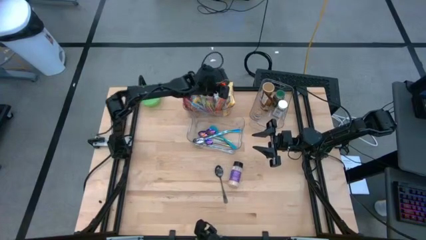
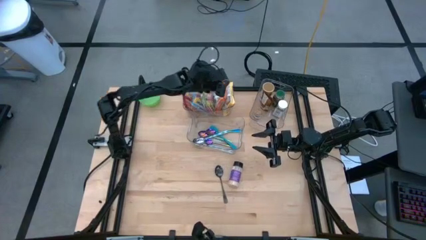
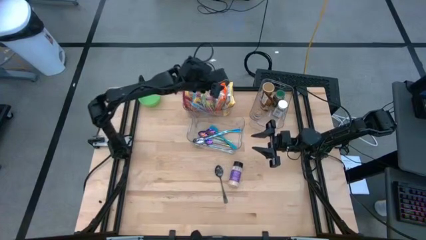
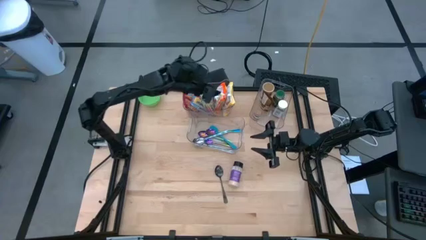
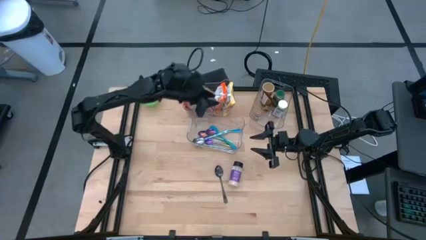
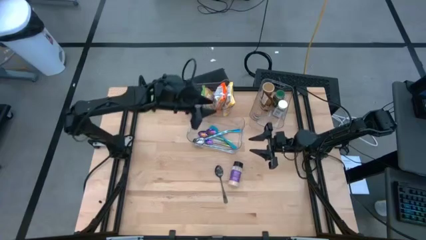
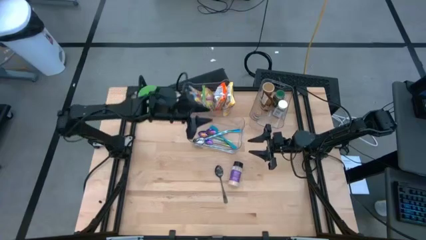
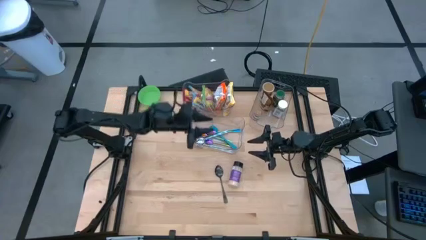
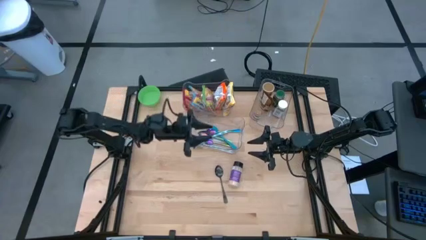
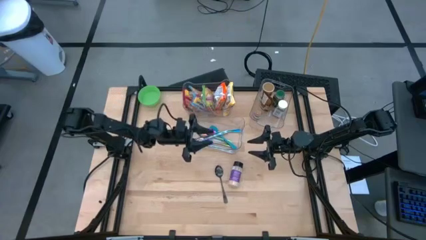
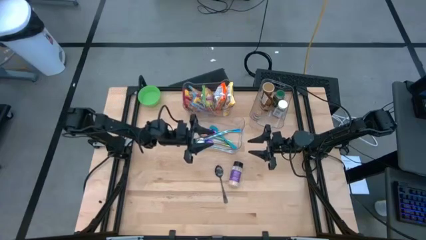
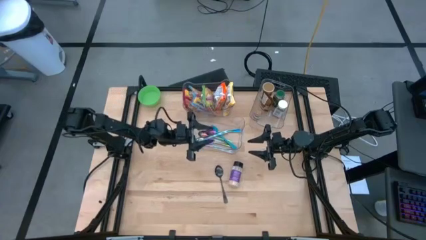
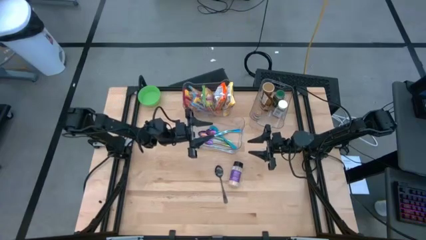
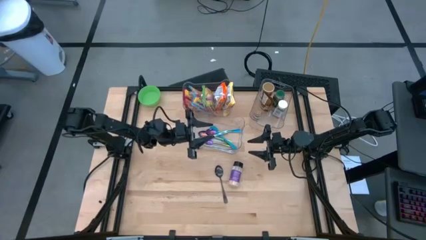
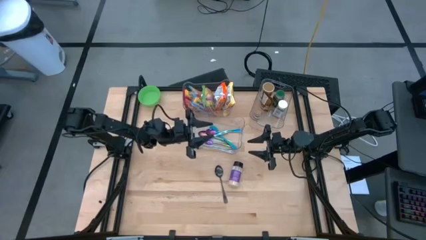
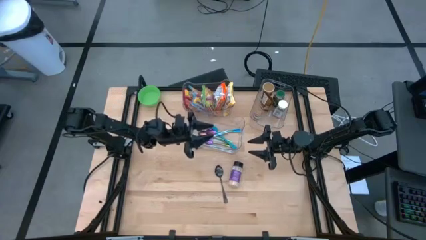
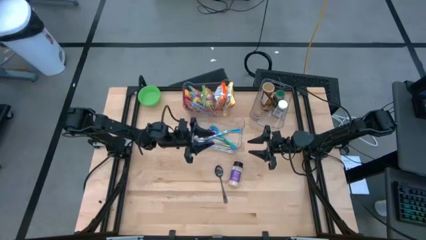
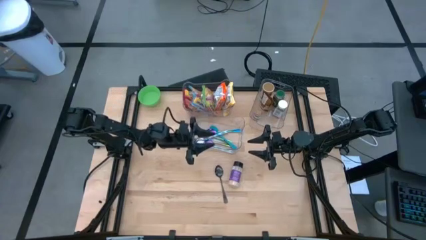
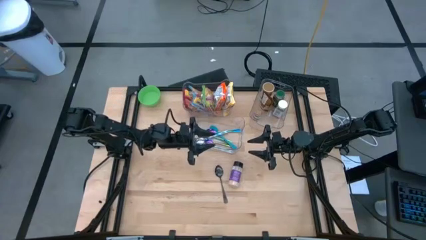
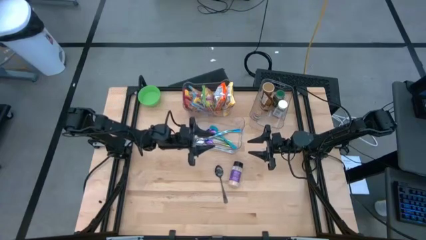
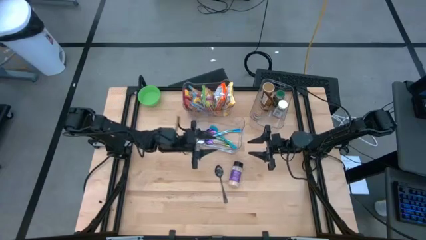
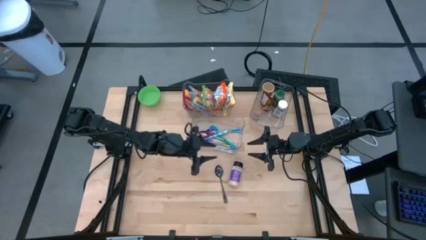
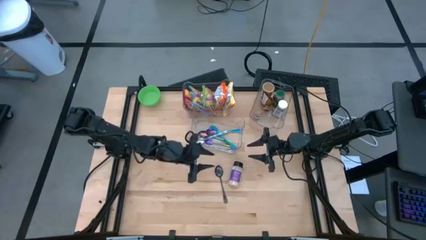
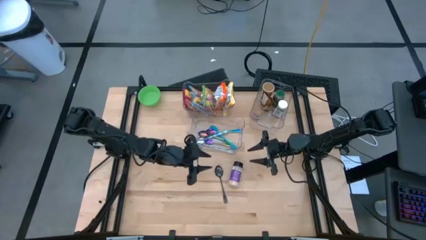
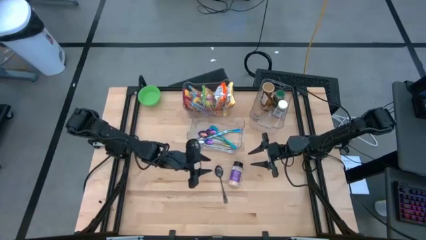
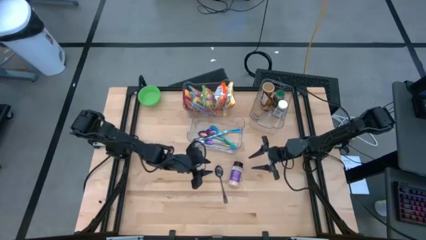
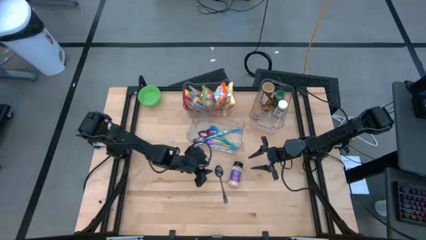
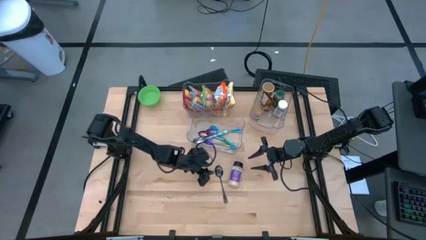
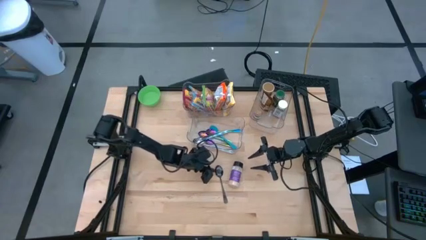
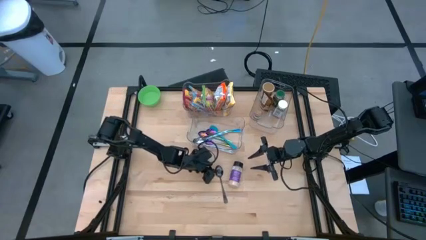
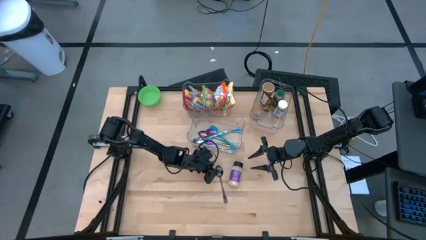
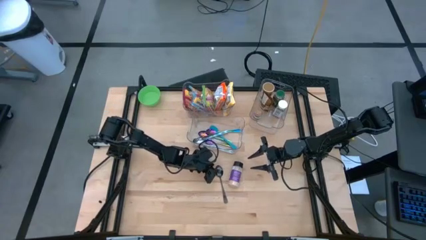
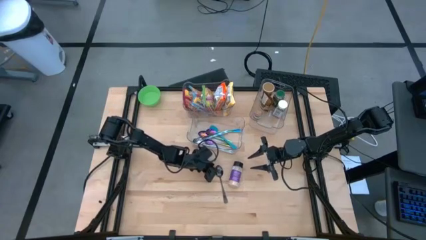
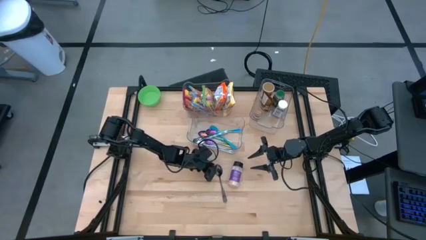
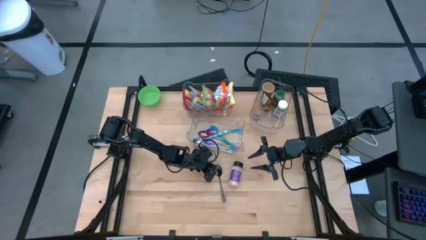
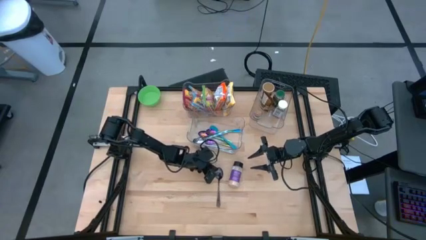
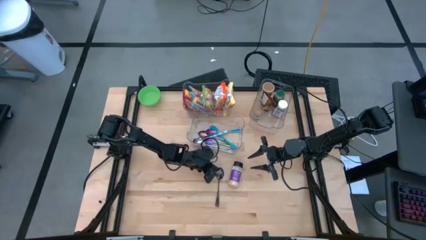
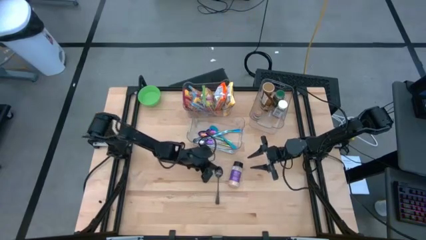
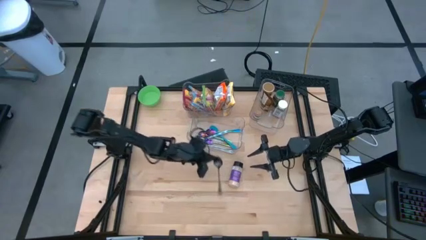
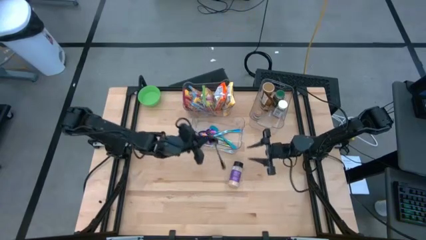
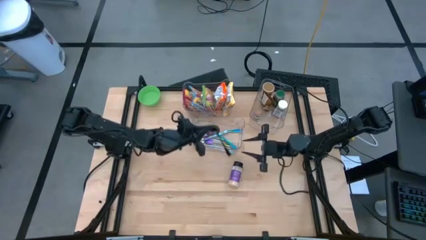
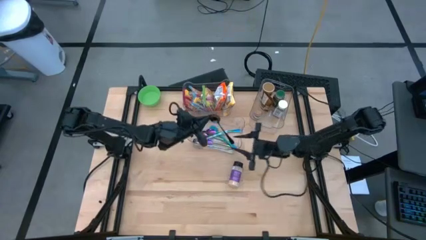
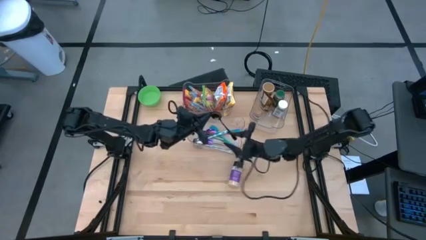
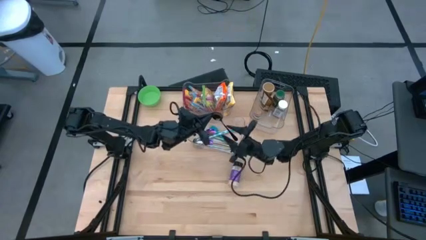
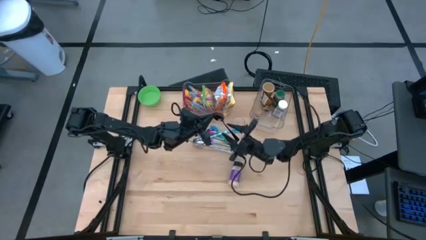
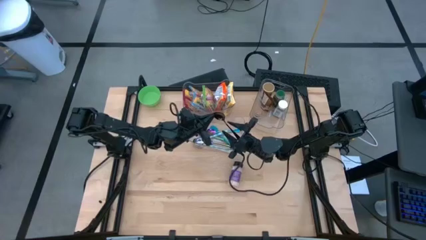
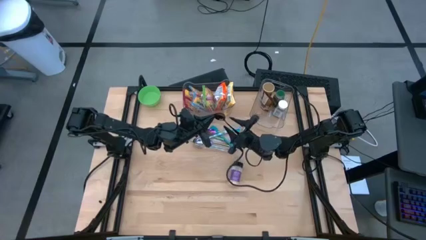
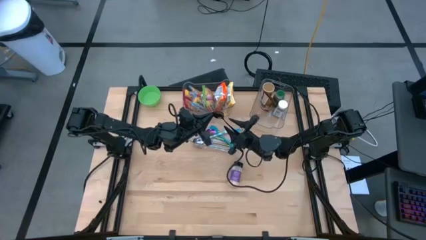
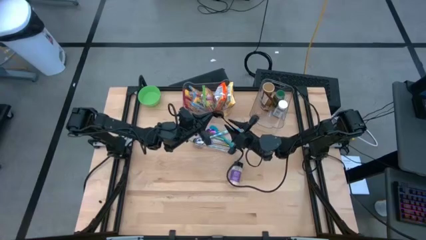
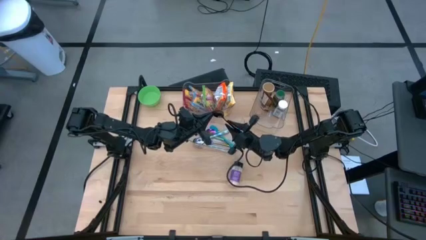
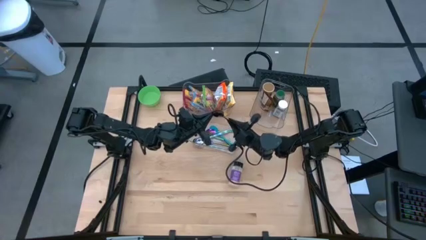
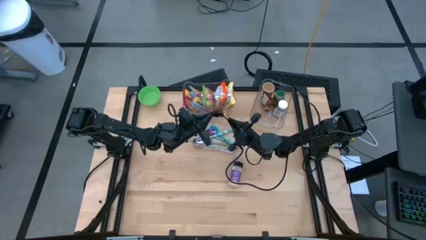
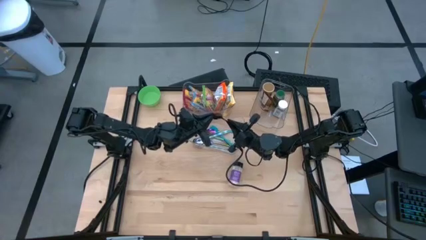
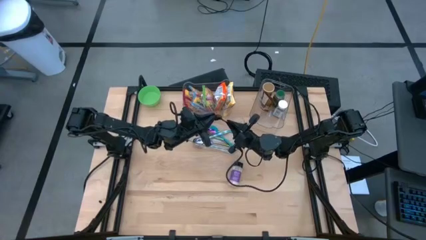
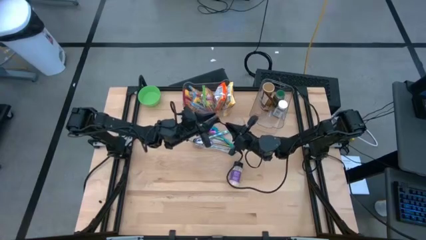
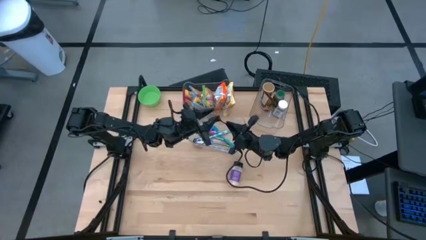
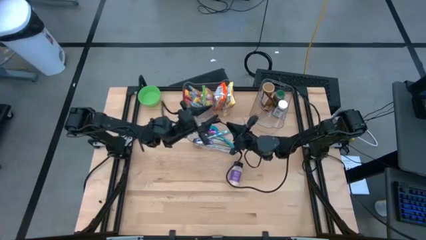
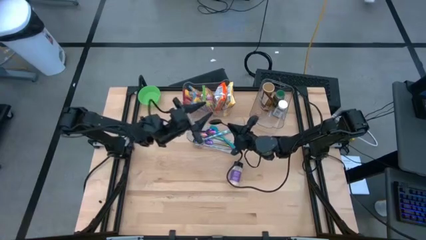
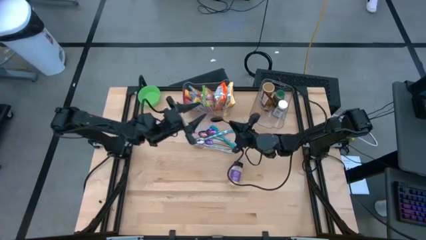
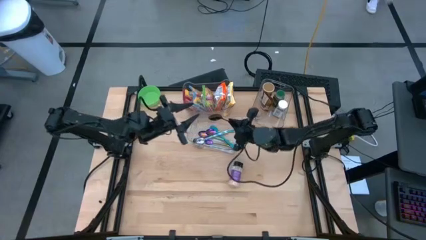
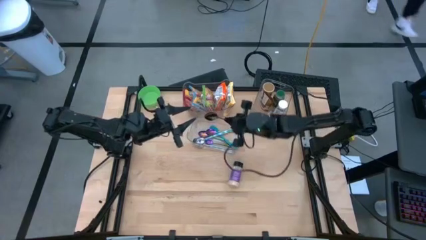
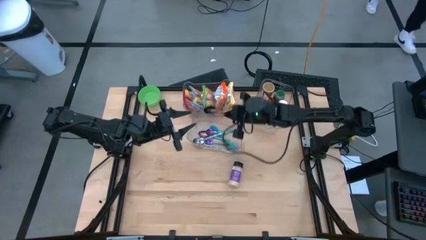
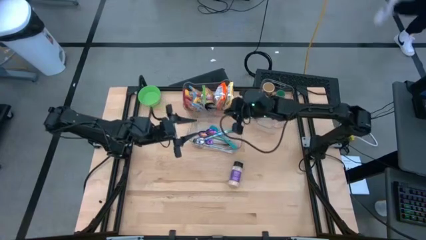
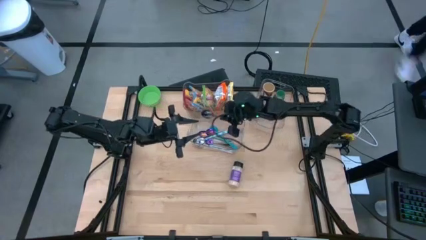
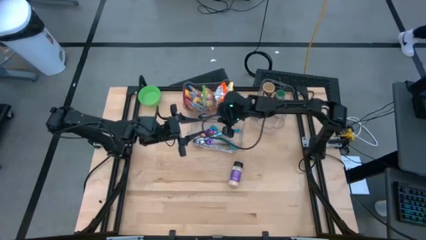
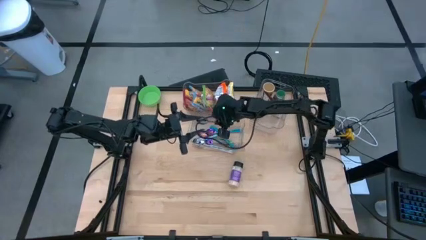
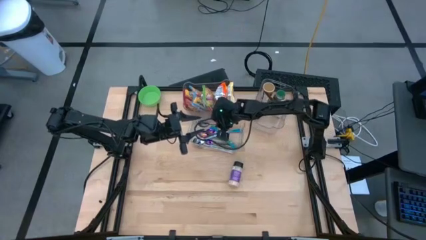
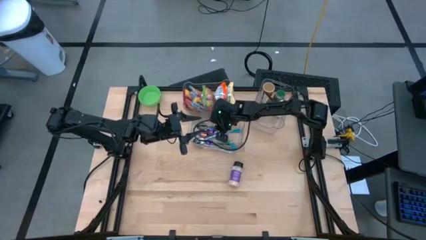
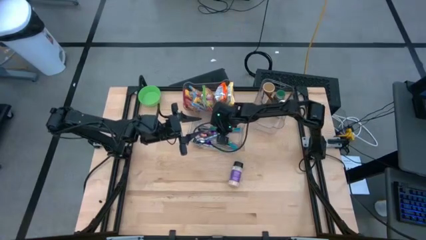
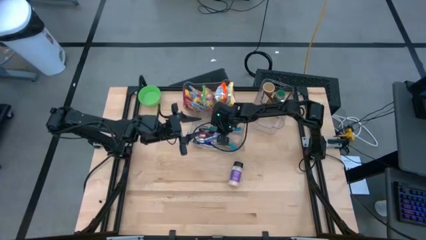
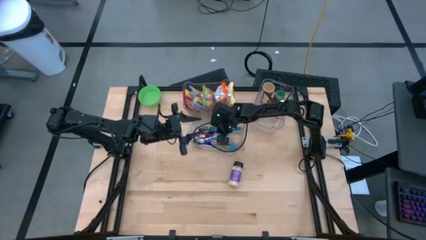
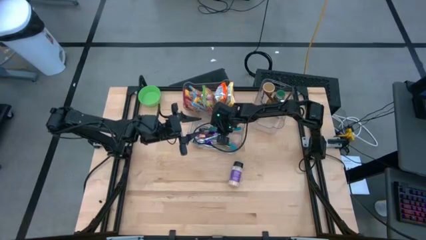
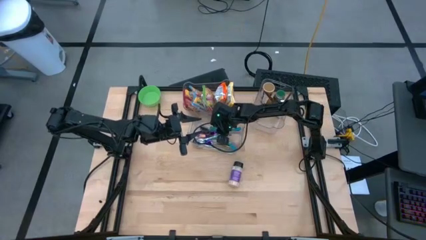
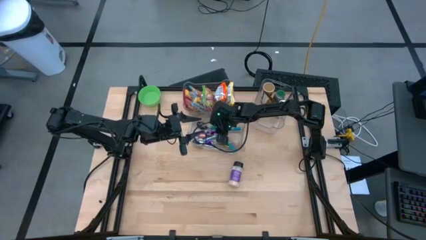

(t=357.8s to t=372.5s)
Task: Pick & Place Food Item
Put the black spoon into the bottom transparent bin
